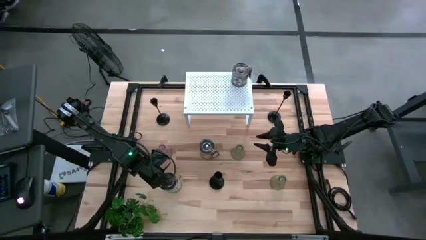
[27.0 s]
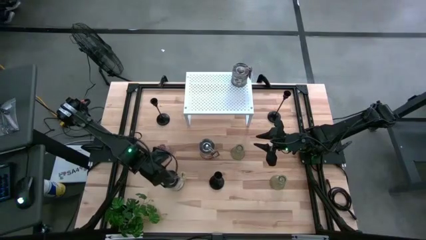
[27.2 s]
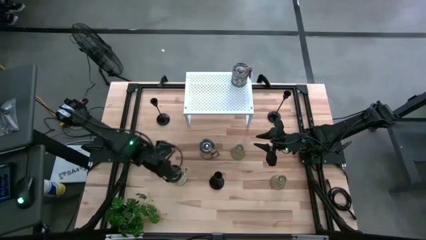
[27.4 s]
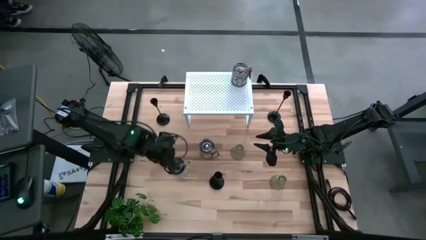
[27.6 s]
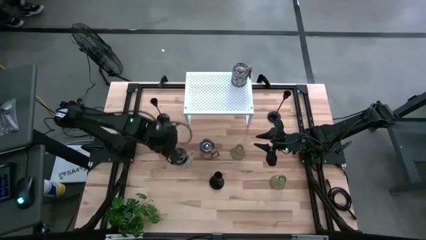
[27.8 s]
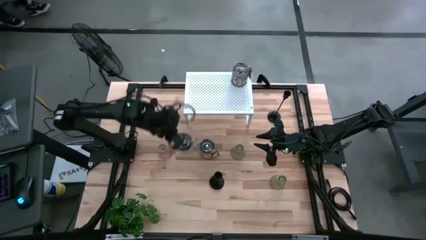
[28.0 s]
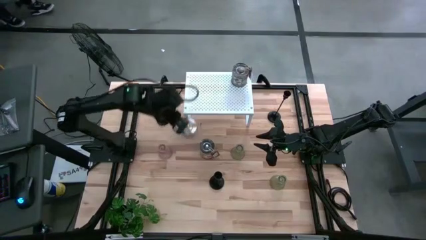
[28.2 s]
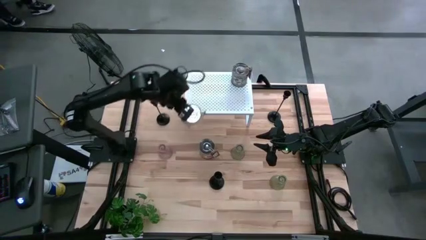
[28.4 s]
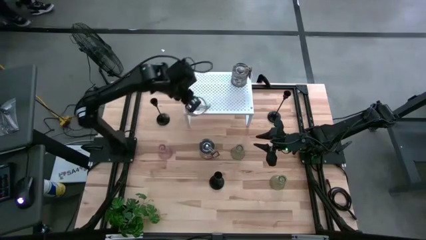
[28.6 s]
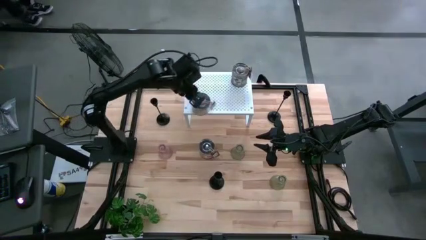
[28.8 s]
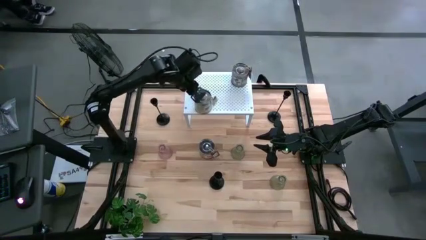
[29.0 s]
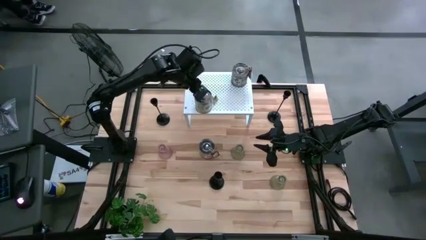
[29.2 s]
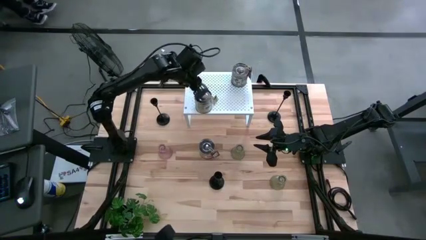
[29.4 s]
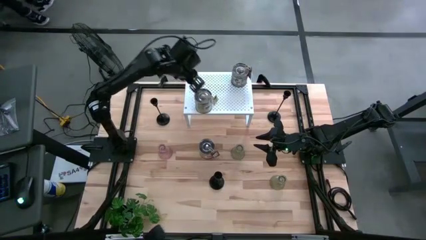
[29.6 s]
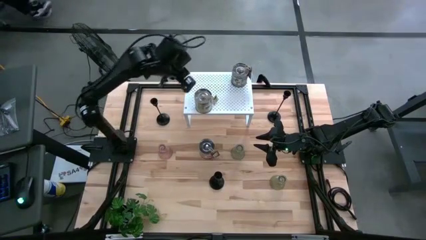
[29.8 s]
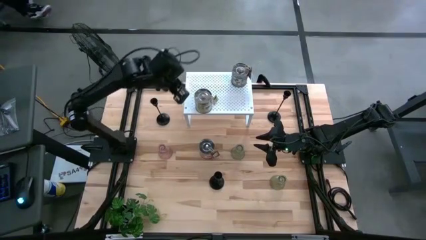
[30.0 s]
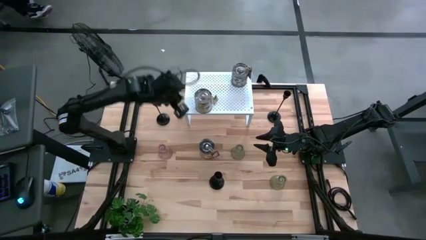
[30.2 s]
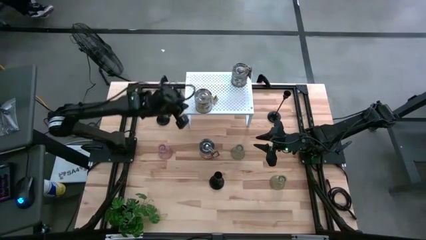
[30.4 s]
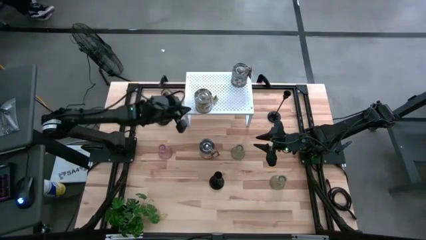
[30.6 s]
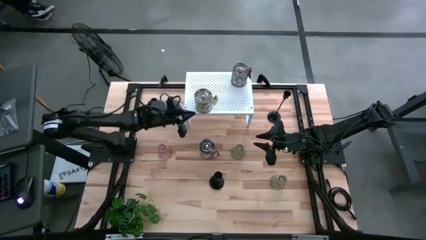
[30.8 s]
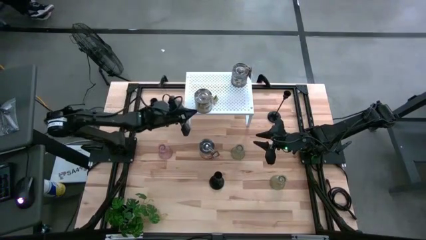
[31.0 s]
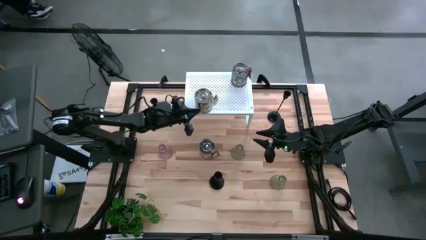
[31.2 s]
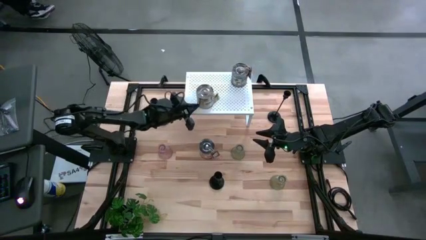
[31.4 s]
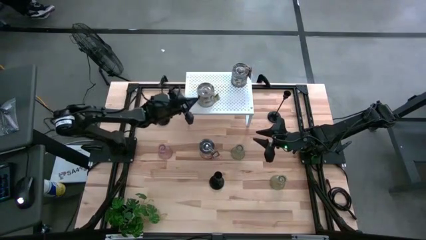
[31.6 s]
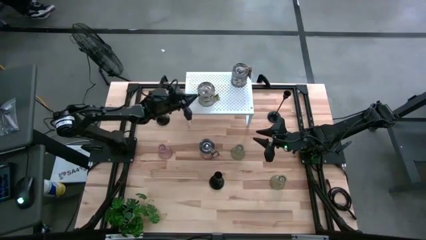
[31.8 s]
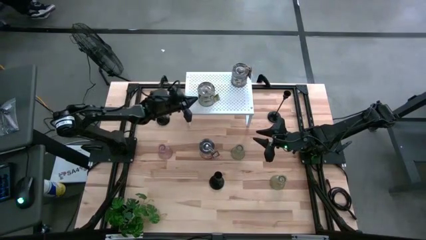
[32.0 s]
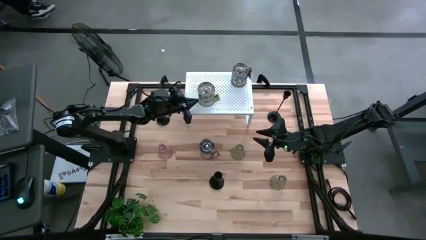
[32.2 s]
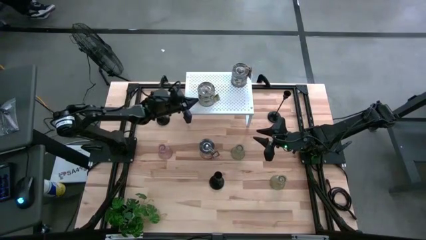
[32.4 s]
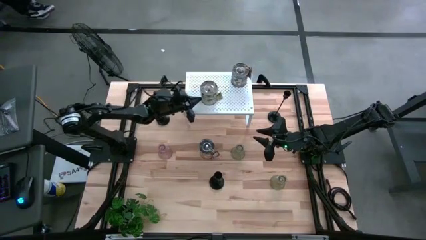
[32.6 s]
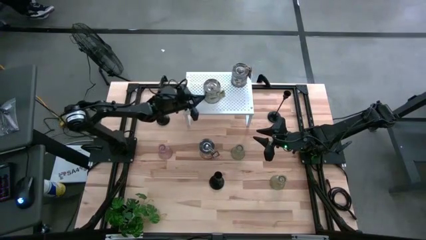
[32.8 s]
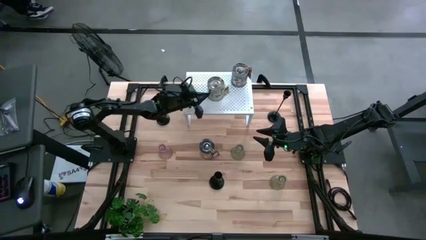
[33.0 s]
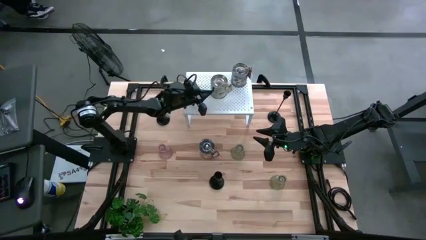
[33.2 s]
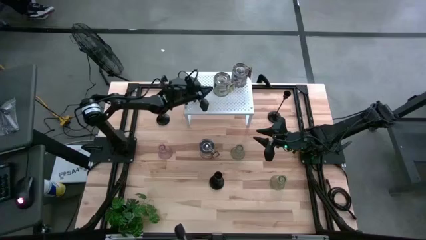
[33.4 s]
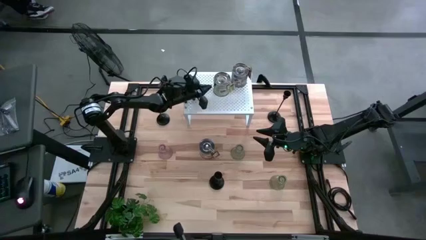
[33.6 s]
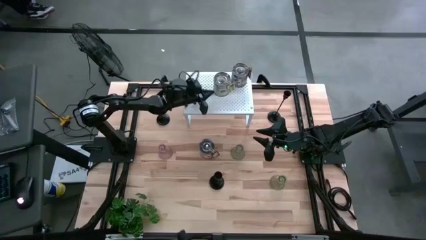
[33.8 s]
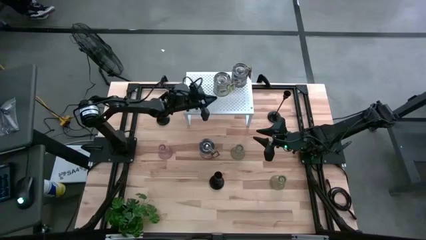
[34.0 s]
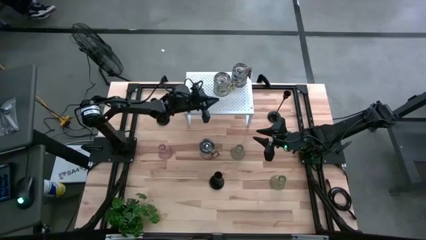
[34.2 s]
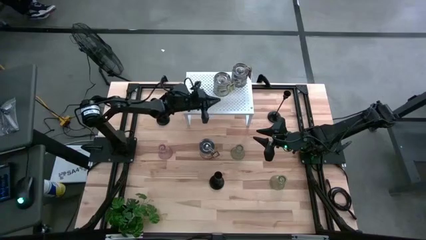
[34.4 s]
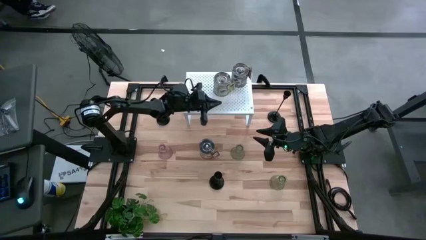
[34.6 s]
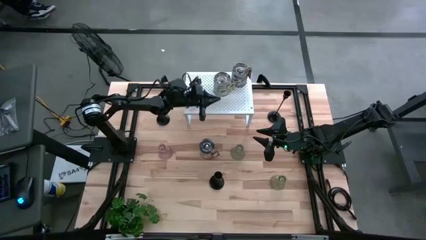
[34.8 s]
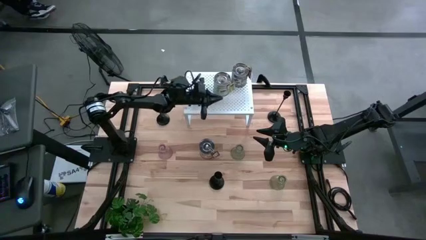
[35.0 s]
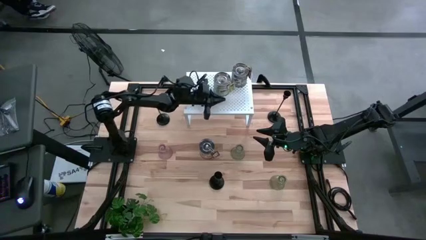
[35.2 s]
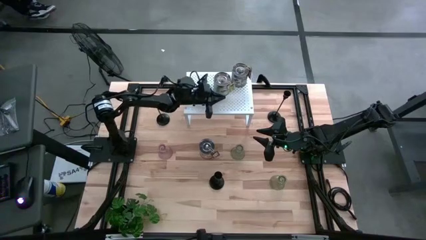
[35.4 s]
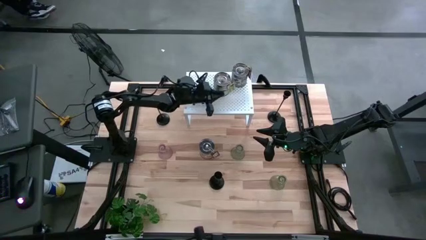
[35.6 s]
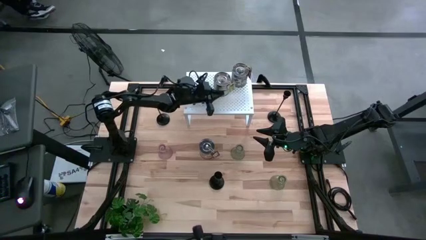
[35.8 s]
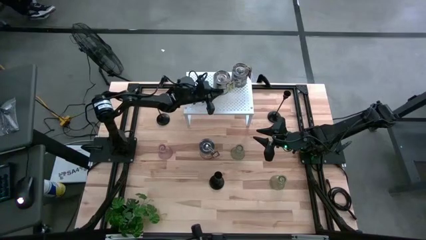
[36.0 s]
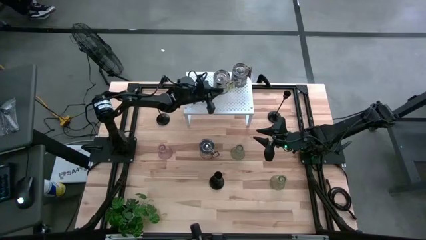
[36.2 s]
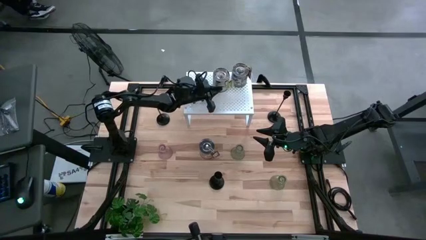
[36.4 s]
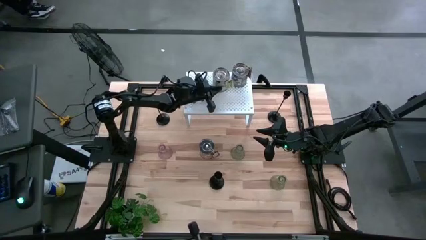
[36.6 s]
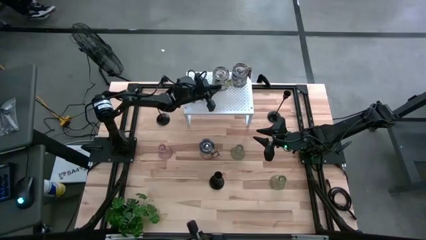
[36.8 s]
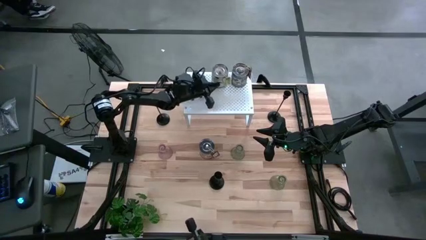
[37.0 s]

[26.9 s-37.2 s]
Task: Pick & Place candle stick holders
Align the left scented candle on the shelf with the other scented candle

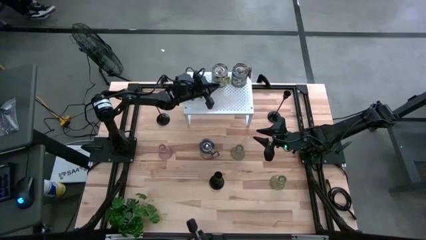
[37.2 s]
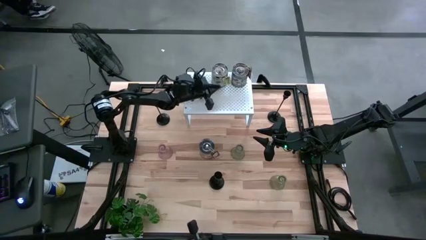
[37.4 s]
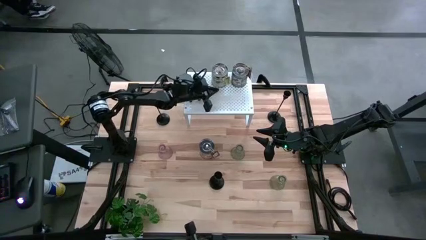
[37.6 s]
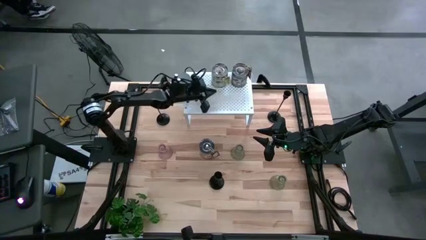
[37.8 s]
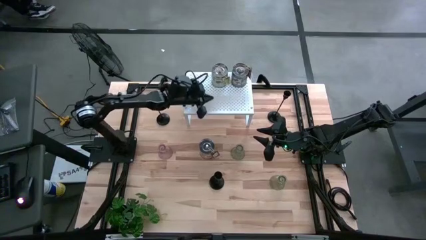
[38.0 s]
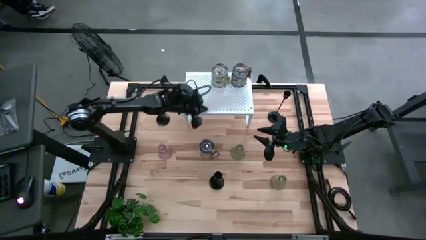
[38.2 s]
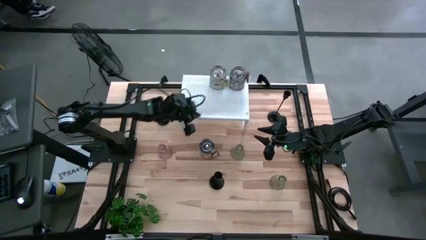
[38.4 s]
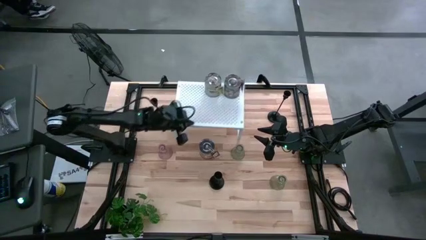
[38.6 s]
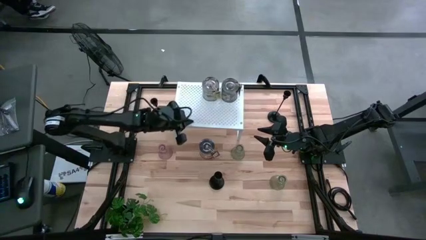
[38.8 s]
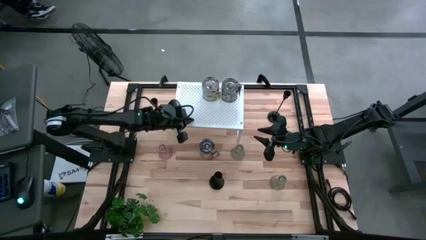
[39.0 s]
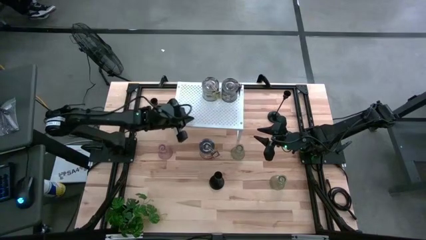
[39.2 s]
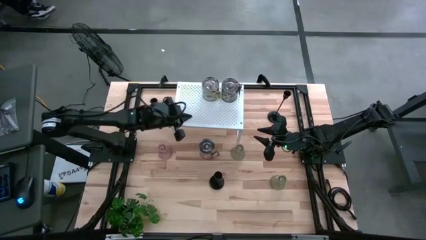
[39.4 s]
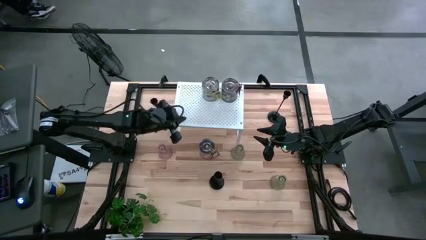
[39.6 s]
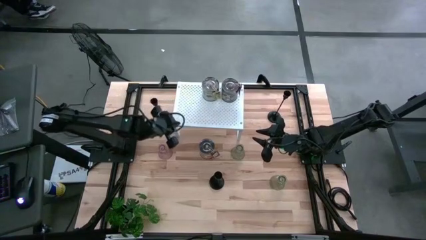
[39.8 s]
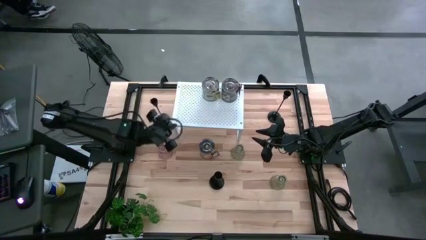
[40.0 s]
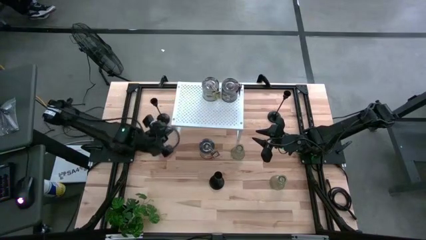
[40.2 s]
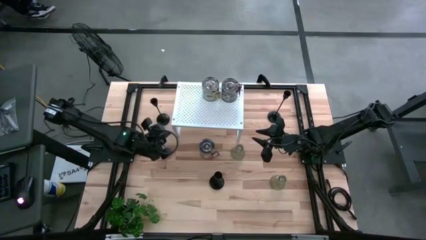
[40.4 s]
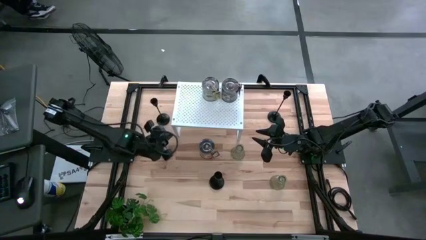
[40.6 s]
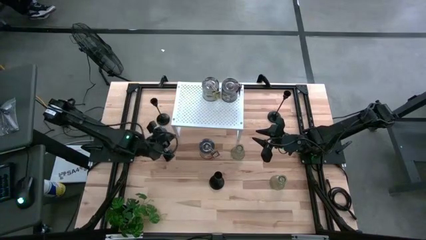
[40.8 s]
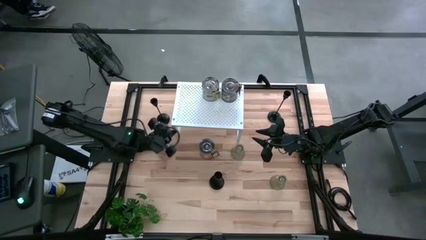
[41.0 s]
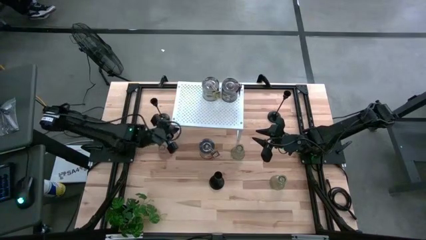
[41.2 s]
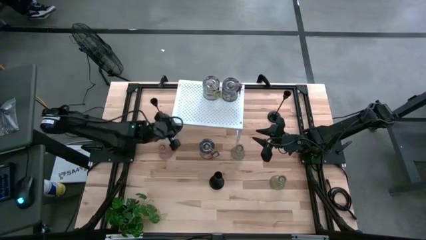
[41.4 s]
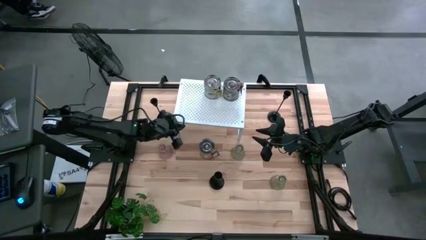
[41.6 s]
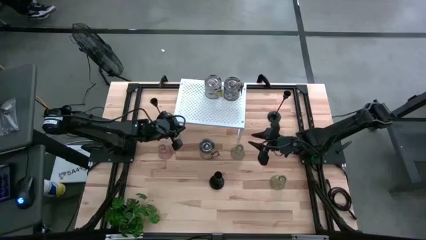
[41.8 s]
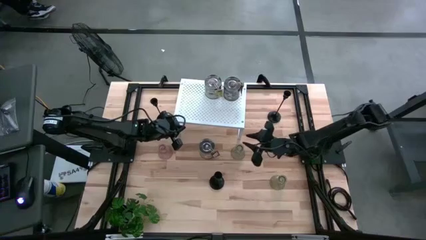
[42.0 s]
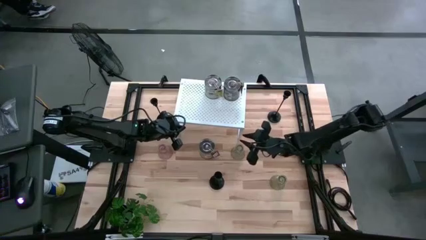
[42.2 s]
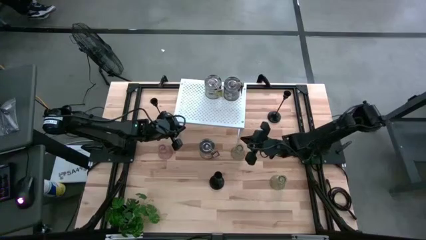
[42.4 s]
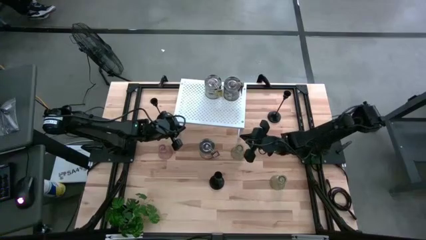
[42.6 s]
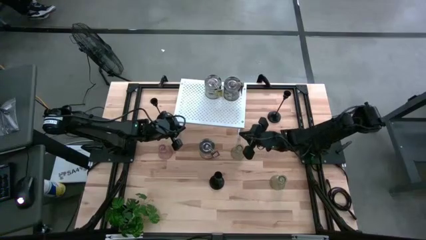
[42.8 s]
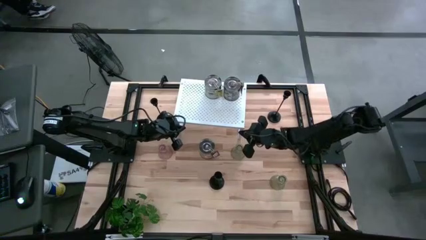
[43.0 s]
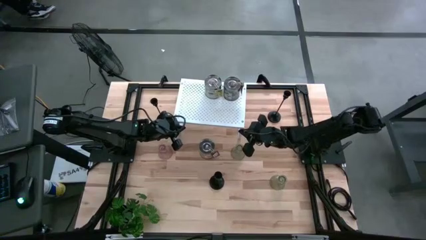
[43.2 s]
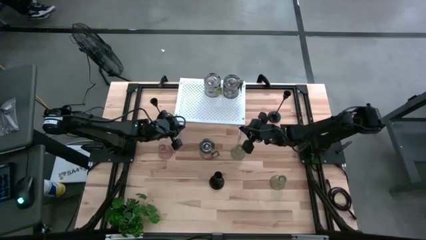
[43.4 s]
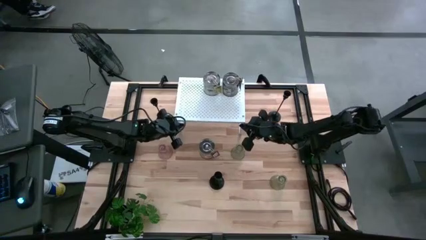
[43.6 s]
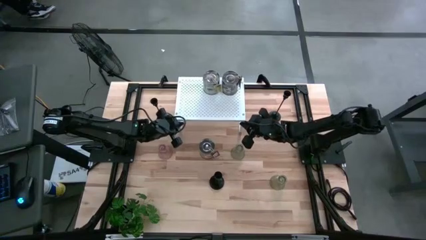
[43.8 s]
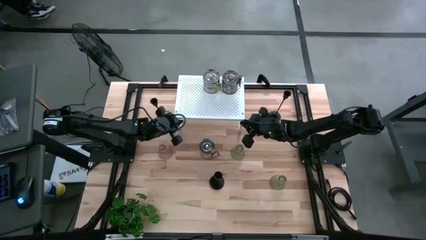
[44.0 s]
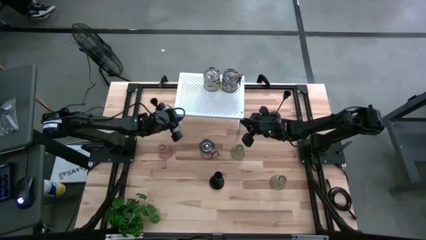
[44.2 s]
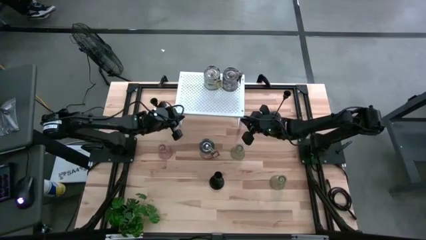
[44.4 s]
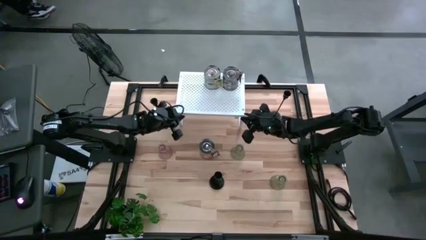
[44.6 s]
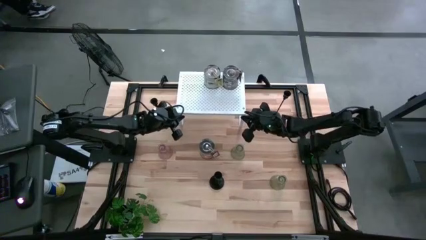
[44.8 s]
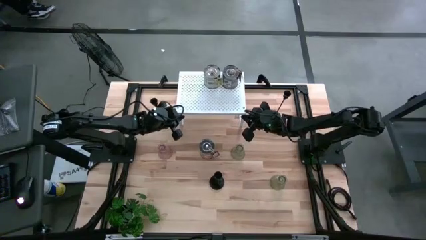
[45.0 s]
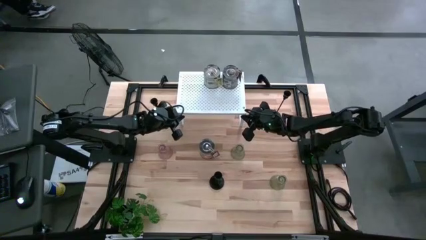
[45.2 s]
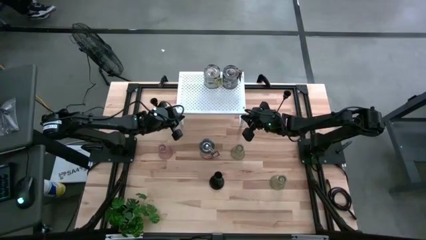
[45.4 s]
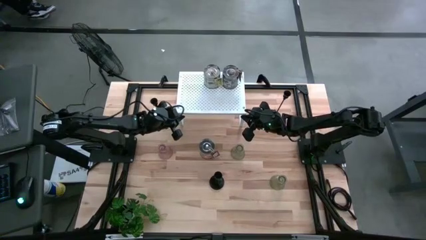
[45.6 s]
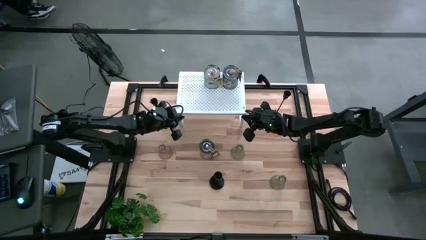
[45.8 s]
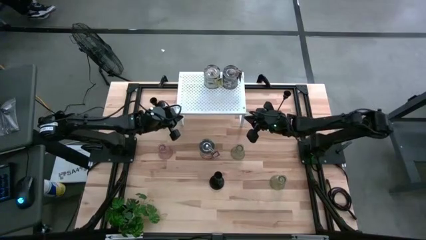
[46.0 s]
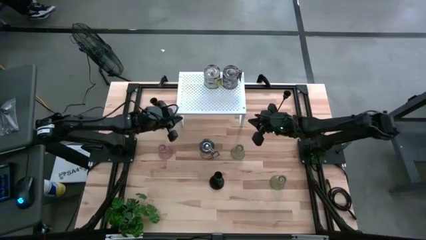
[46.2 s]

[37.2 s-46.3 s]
Adjust the shelf
